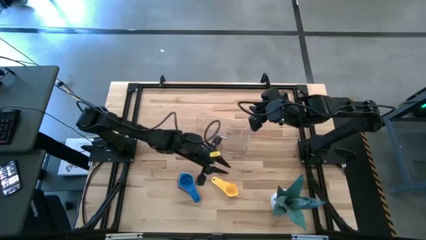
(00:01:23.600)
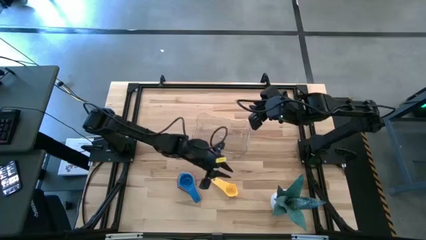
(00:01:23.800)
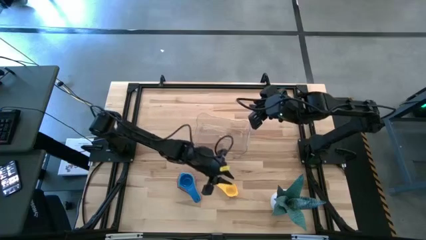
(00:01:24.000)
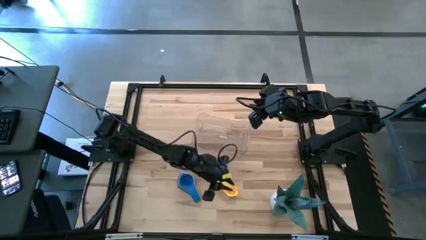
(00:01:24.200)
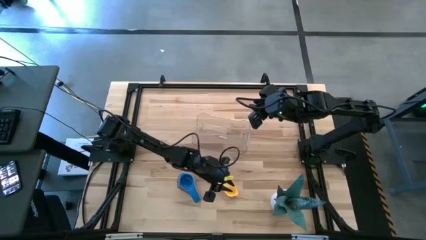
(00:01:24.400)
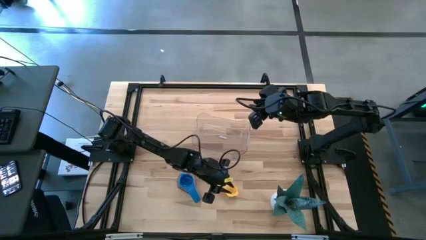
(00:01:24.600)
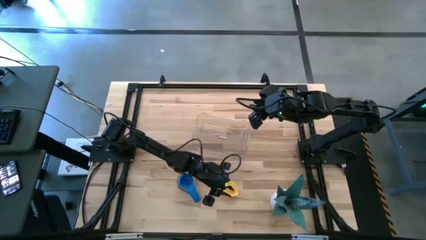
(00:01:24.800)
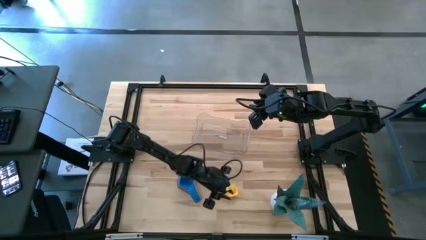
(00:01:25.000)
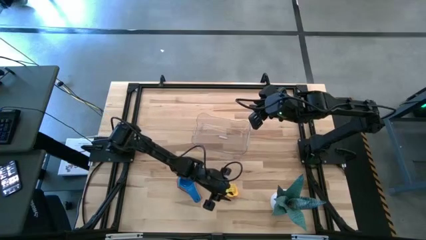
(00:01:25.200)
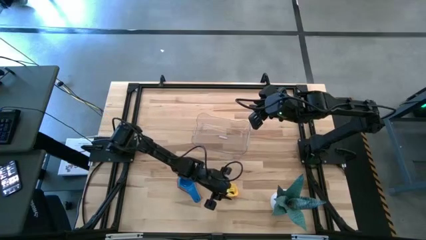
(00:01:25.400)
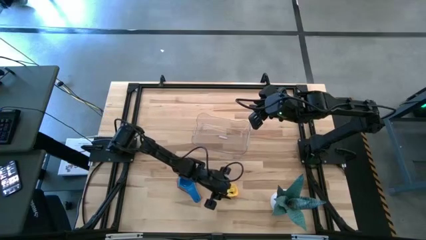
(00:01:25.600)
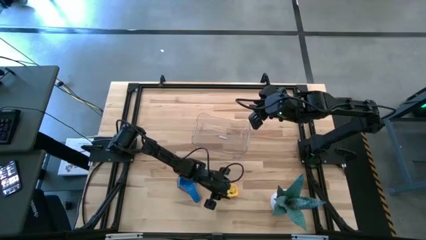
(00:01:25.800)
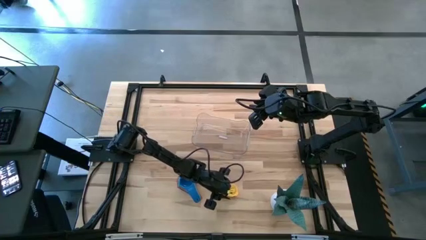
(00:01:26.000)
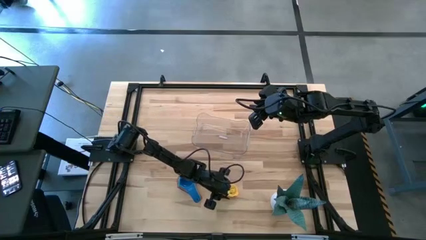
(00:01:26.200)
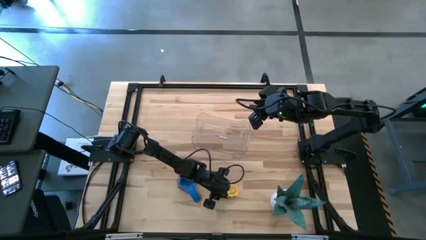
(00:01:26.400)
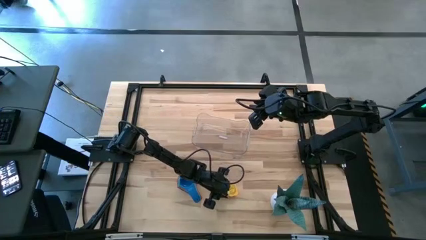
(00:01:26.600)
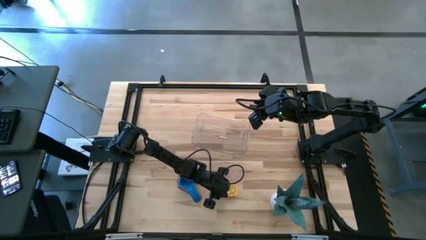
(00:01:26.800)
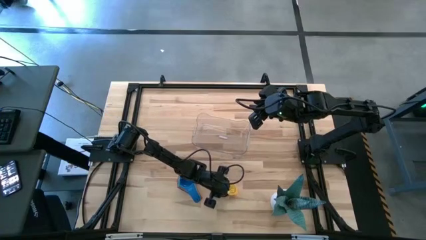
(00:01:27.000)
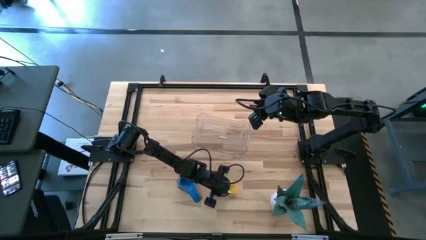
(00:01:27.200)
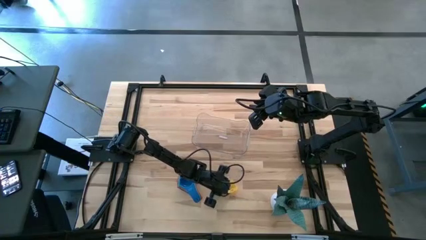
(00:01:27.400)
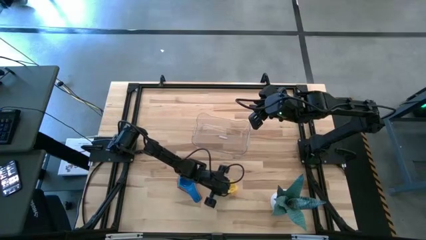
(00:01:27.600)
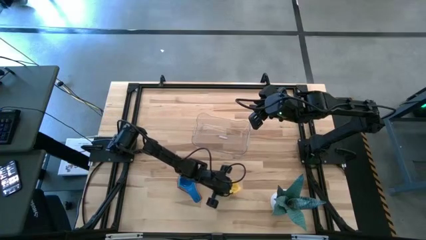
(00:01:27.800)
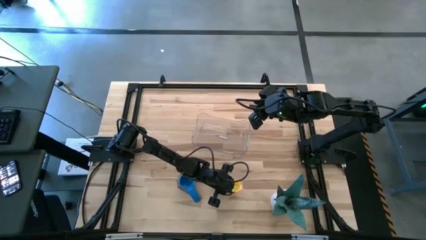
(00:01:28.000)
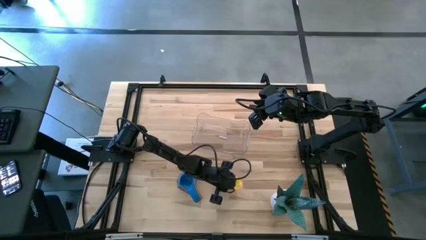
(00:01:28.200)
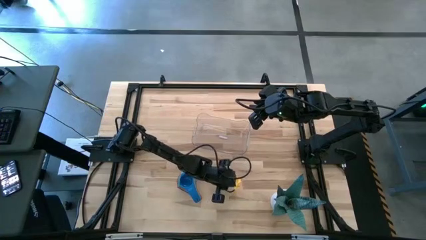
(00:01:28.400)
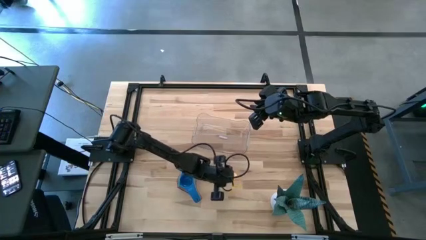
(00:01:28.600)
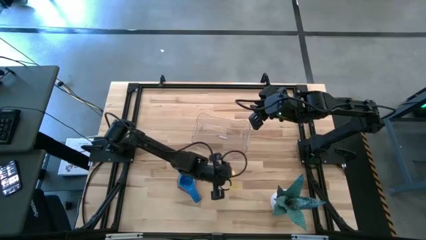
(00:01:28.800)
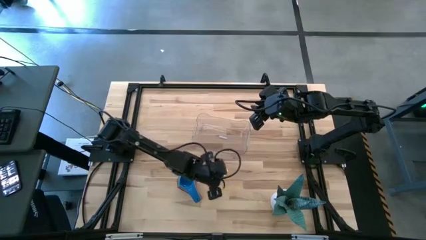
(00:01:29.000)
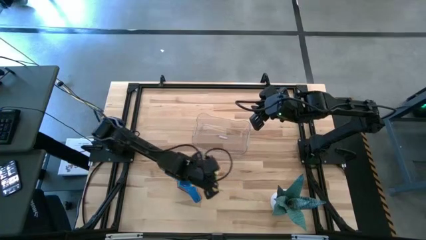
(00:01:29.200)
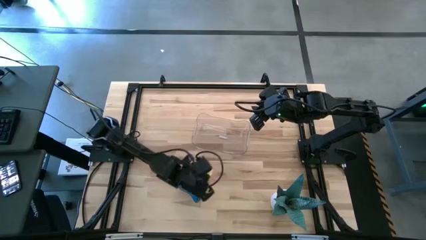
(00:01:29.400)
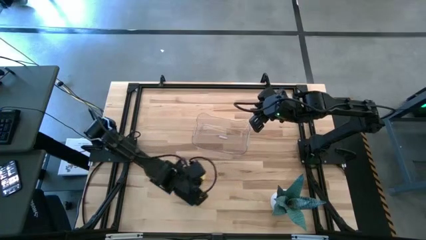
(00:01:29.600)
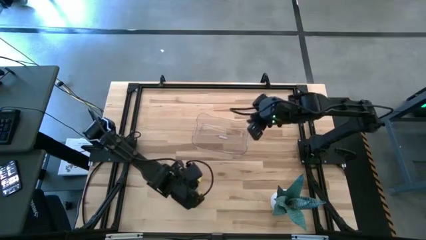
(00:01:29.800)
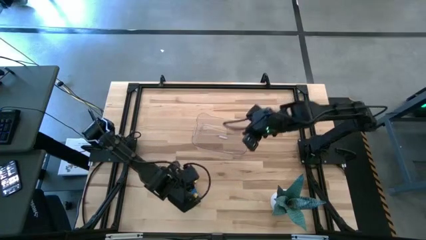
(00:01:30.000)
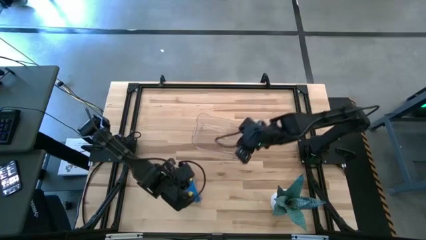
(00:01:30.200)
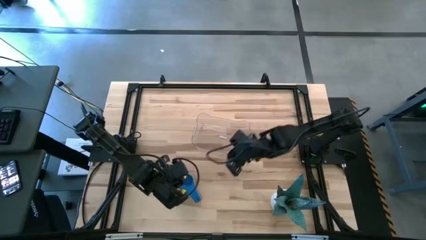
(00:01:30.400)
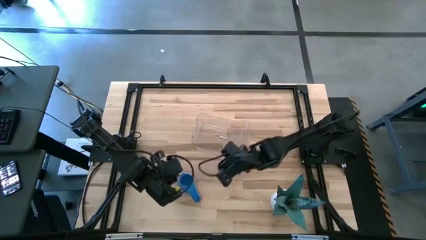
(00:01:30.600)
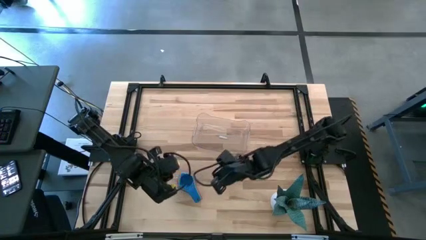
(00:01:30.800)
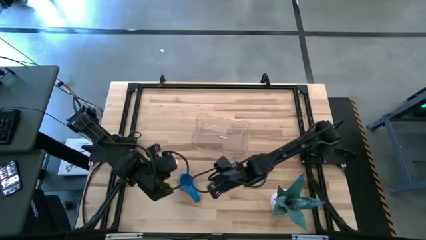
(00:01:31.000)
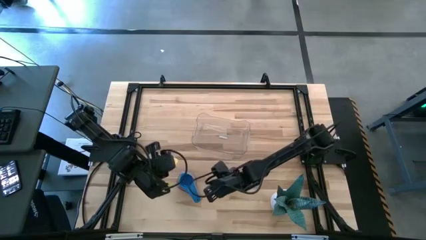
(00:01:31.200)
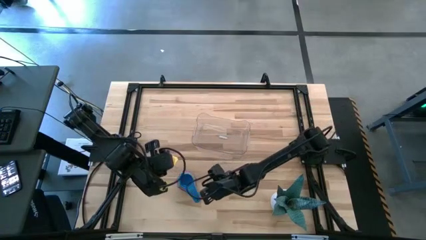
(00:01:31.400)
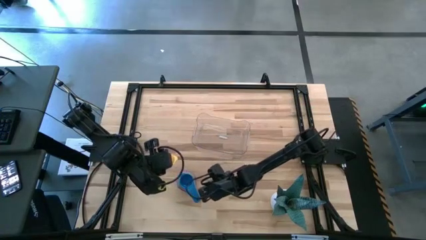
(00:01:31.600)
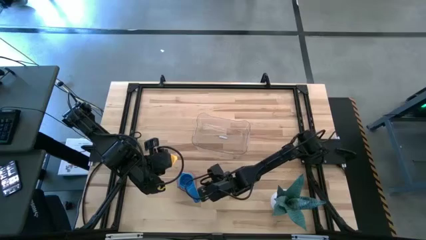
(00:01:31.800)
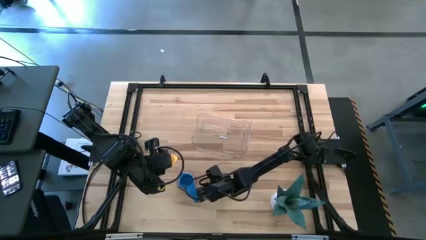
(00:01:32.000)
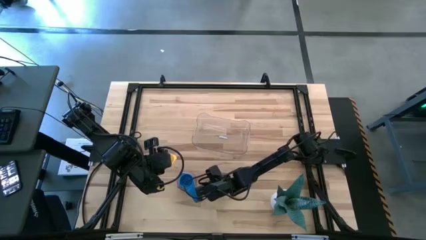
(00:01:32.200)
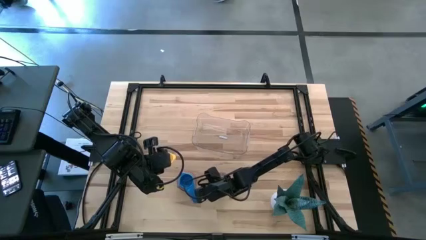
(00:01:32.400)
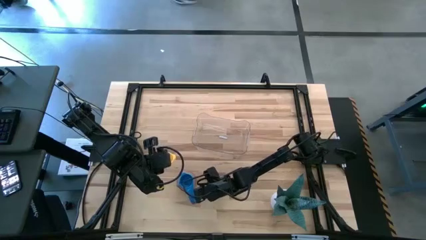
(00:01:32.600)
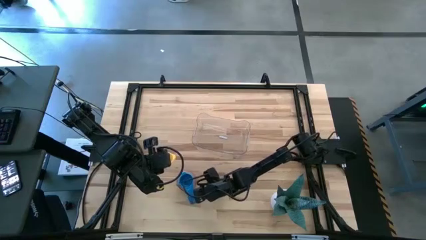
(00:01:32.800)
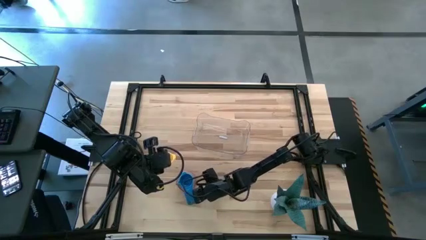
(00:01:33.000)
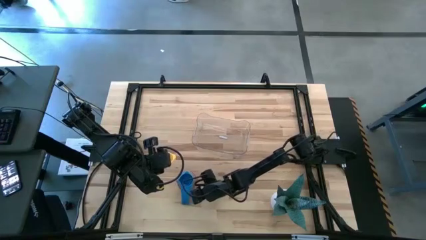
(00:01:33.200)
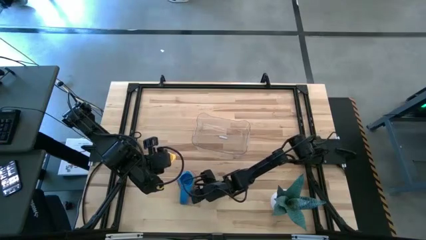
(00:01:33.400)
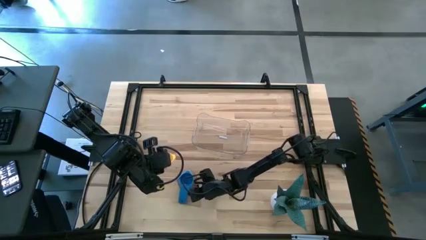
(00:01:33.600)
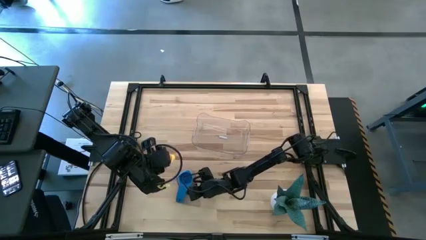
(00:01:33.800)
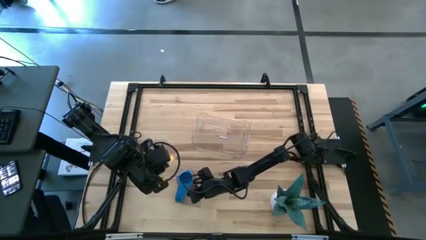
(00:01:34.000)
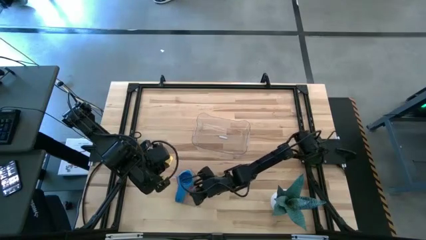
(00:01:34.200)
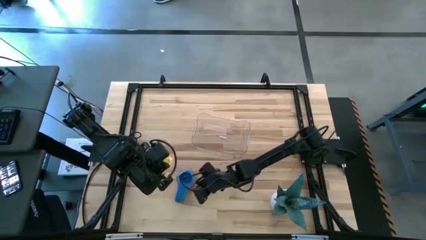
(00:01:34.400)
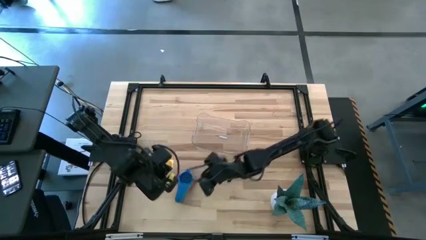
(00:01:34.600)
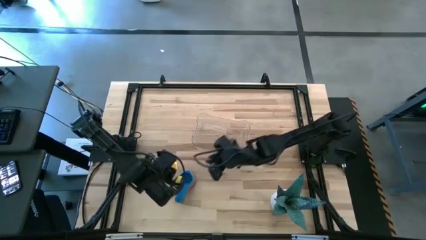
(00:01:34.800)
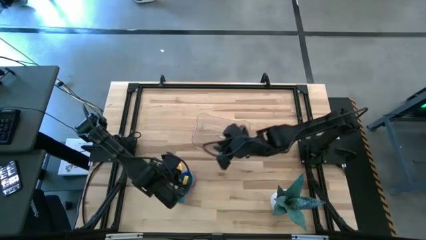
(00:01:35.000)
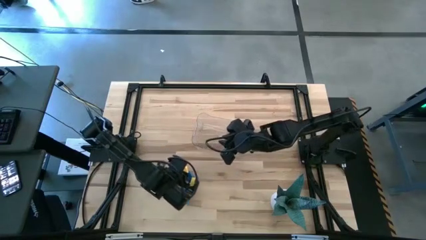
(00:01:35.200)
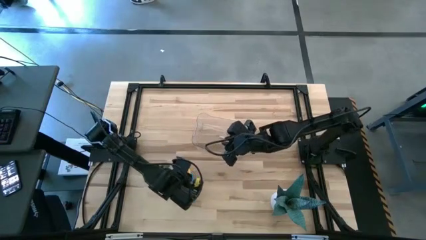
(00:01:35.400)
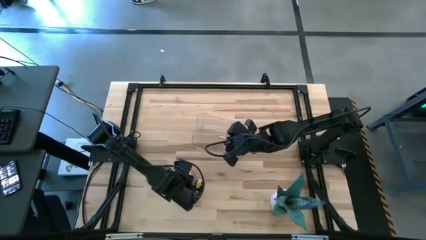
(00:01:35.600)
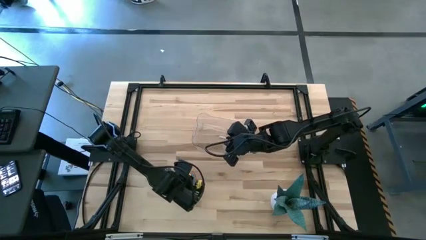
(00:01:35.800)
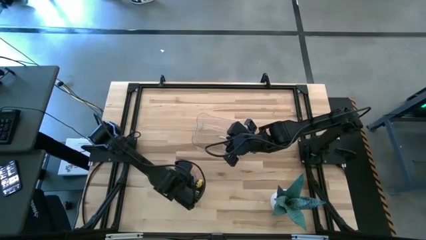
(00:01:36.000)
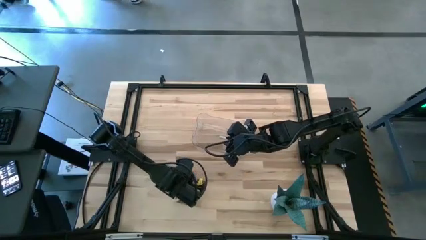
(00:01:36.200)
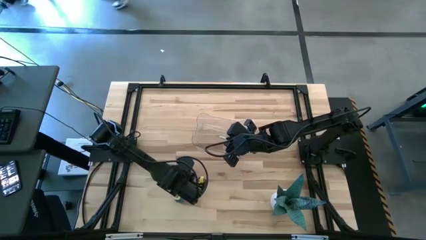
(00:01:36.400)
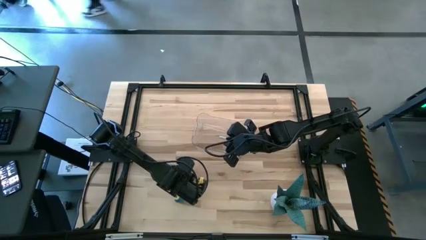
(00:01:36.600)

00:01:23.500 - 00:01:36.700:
Task: Nest measuring cups in basket
Stack the yellow measuring cup on the dark blue measuring cup
